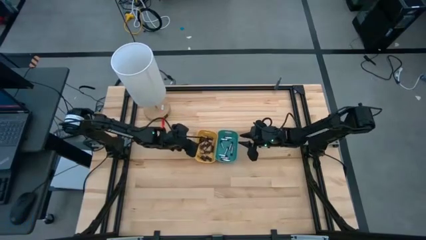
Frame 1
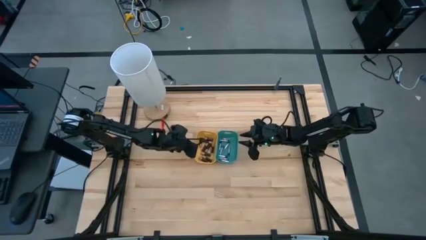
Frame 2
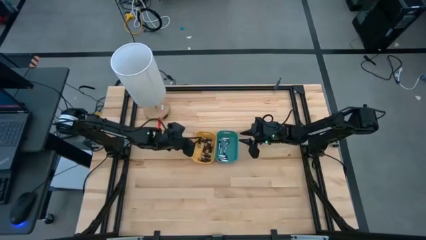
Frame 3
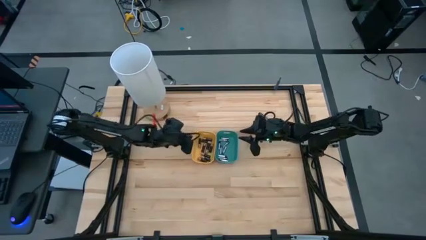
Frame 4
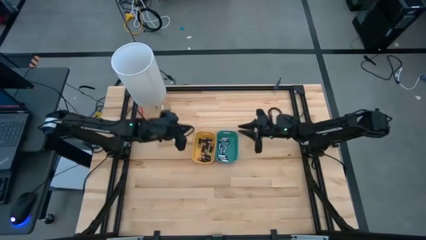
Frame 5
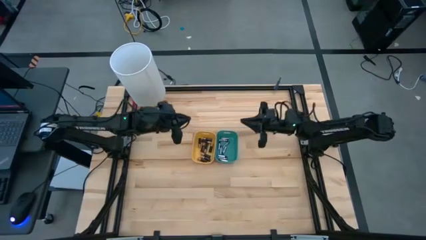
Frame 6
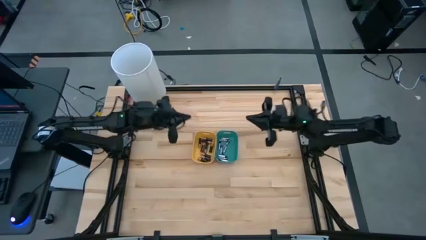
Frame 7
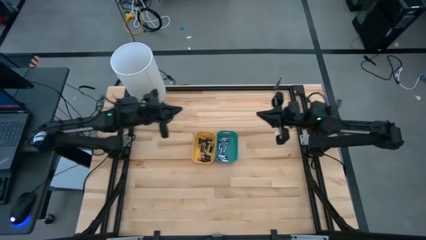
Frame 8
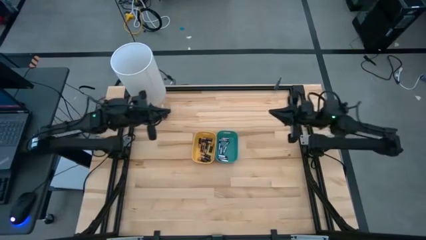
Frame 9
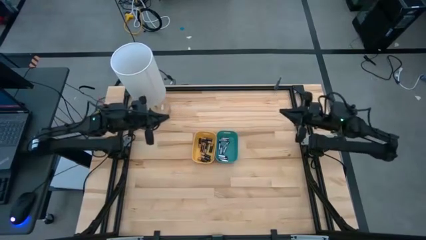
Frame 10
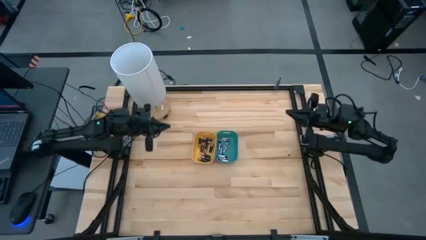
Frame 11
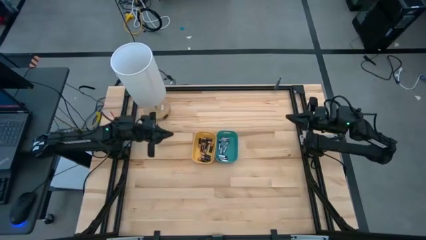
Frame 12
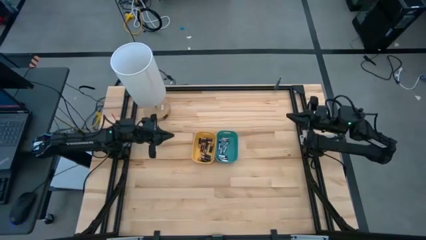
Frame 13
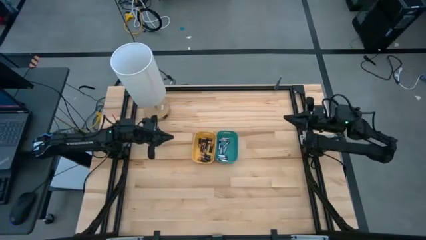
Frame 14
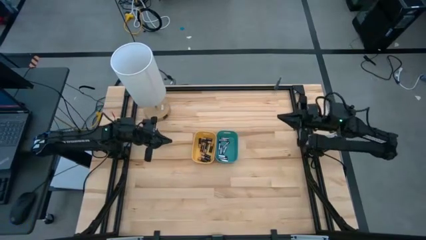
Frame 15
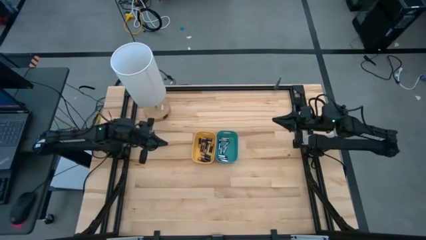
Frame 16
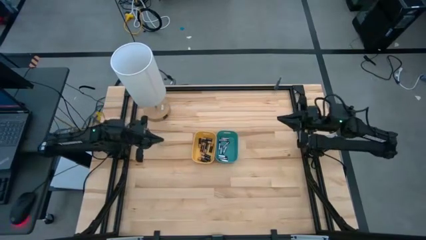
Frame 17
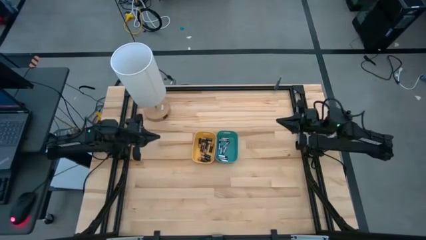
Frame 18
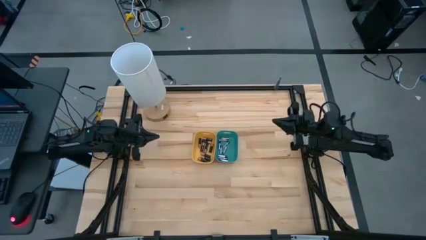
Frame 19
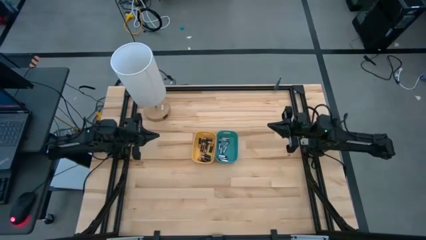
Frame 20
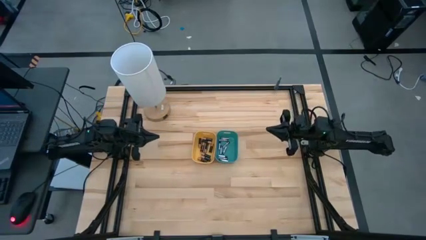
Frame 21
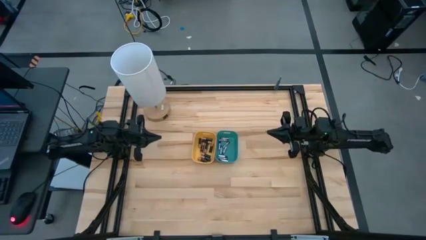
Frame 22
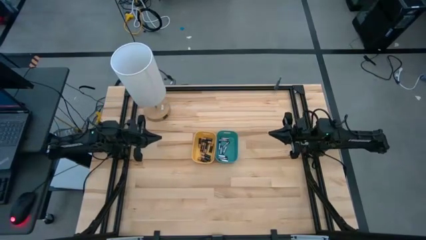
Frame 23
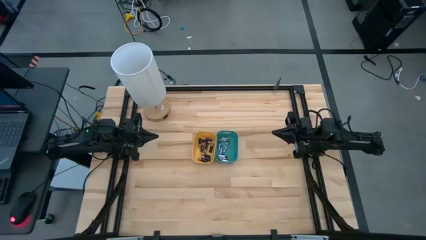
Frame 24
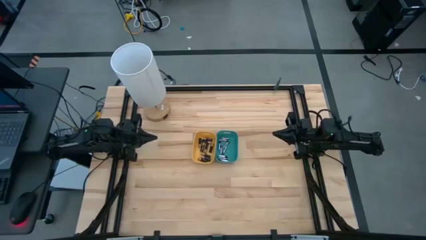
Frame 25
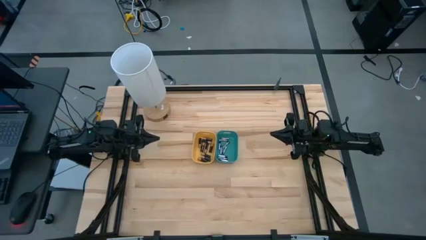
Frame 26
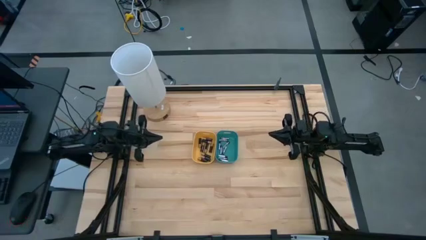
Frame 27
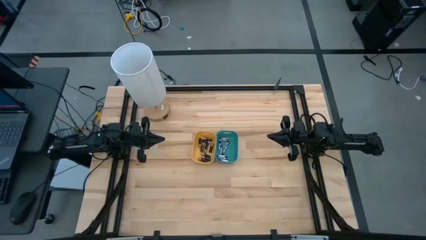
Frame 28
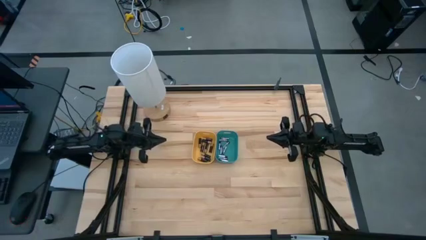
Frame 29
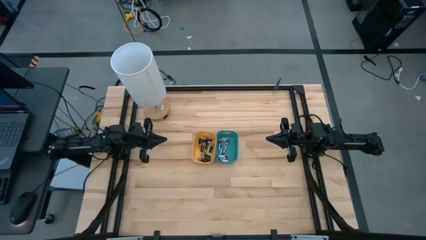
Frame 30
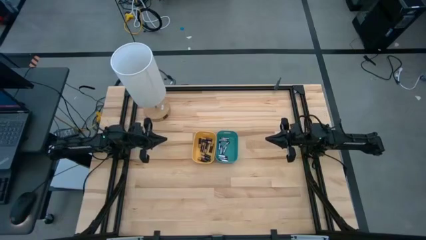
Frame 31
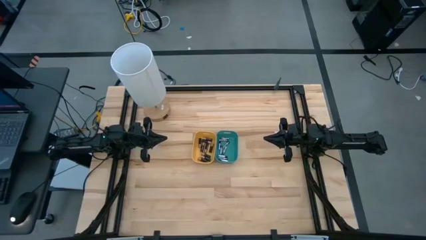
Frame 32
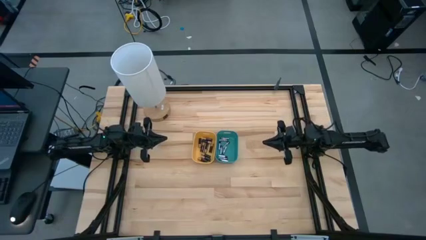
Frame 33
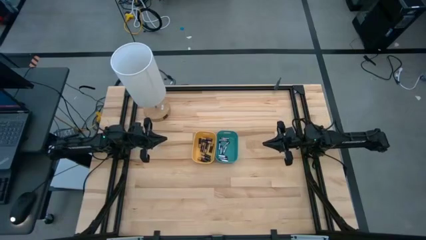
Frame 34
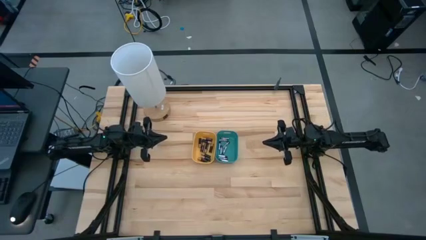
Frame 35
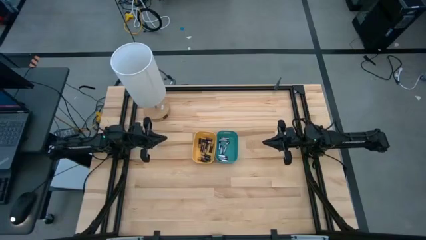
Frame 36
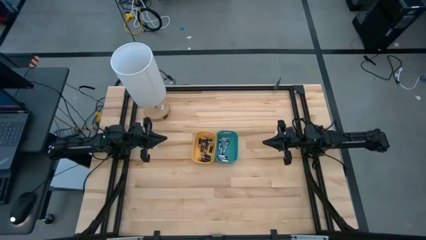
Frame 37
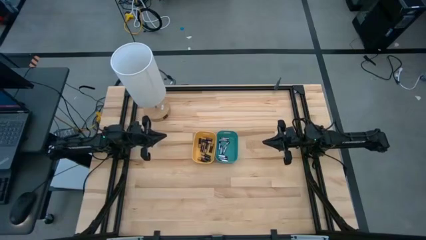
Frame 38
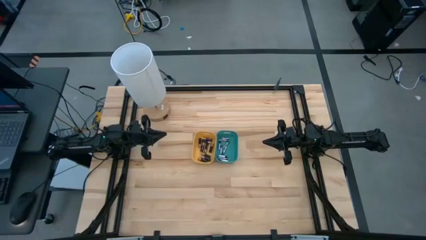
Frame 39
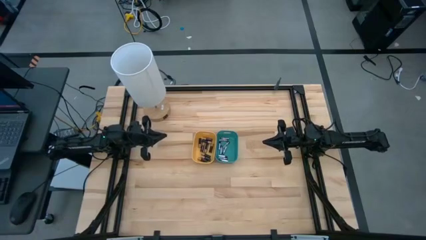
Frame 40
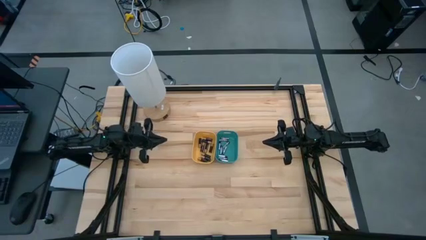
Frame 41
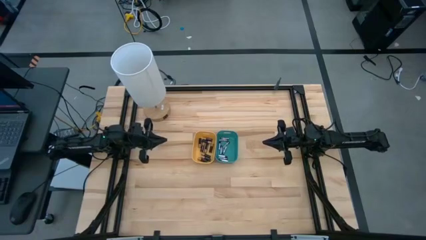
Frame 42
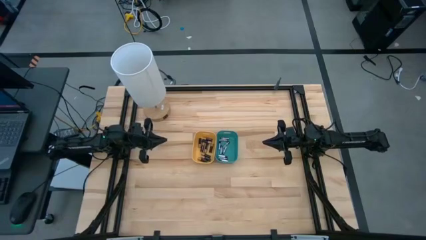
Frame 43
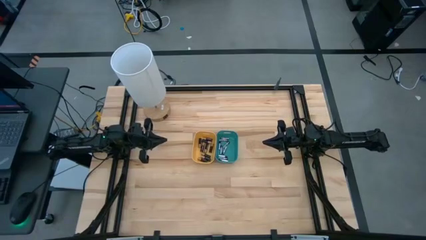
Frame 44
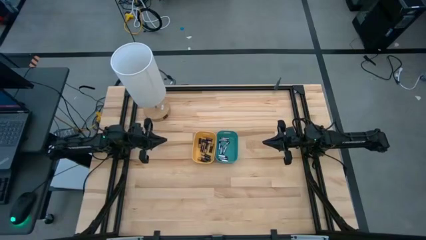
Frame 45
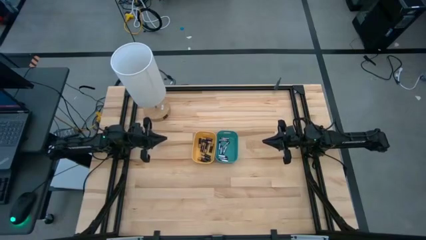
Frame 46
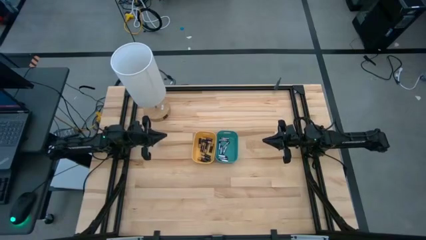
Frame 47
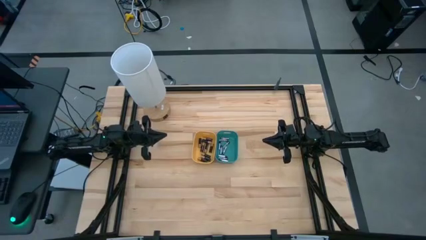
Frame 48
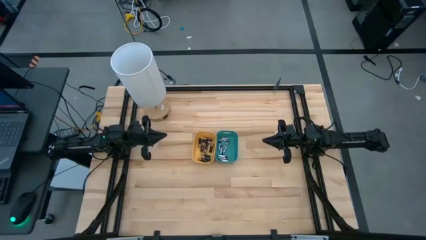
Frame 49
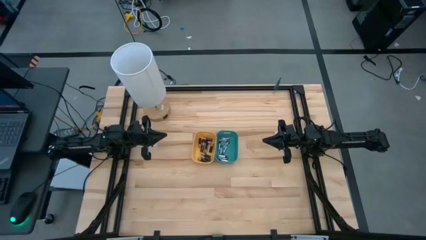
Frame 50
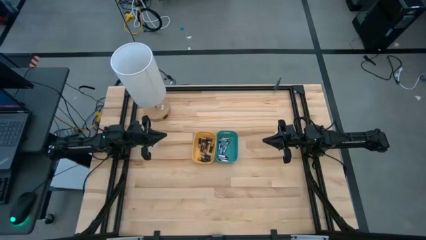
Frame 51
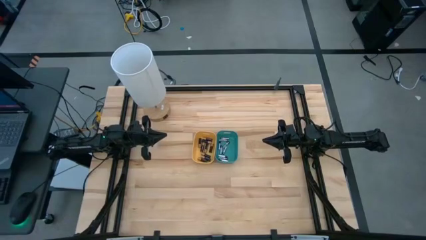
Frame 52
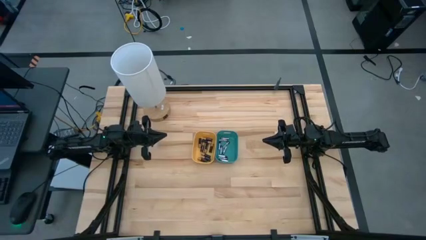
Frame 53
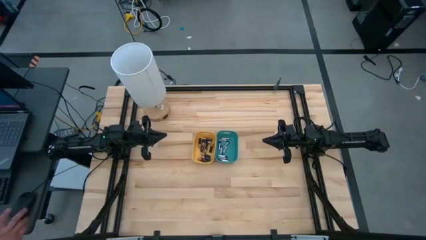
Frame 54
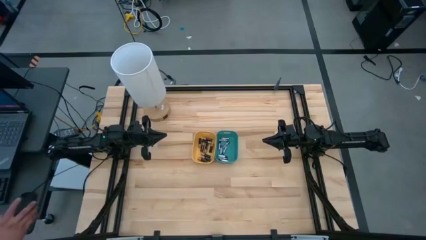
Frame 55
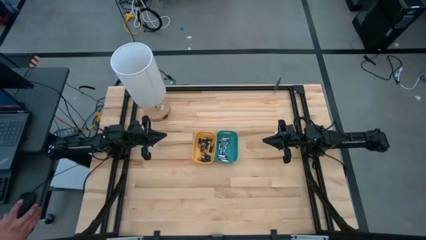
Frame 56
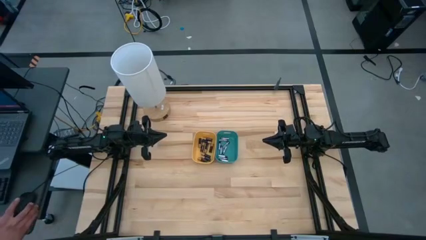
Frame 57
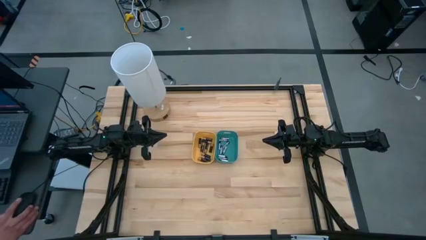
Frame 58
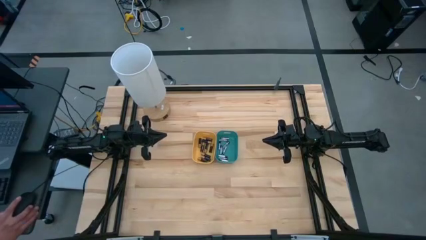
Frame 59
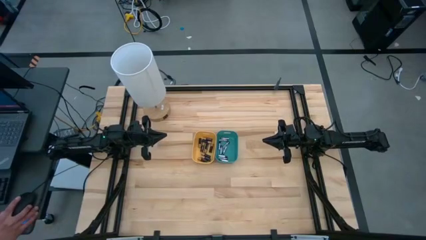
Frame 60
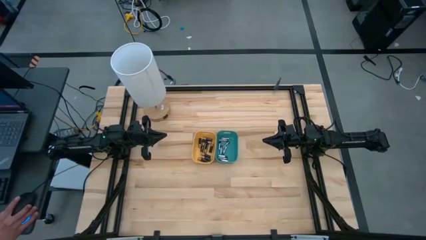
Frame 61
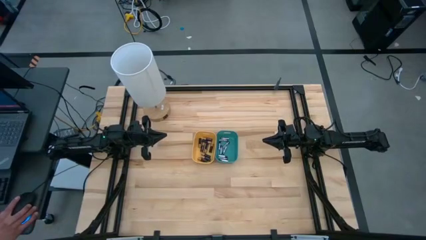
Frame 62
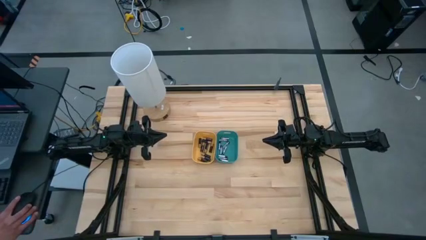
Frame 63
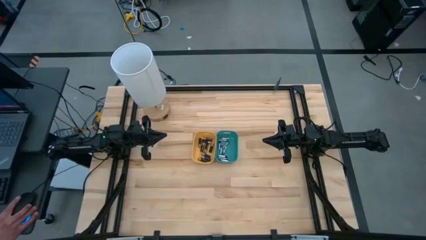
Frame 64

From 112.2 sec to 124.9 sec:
Task: Sort batteries
Return to Home Position

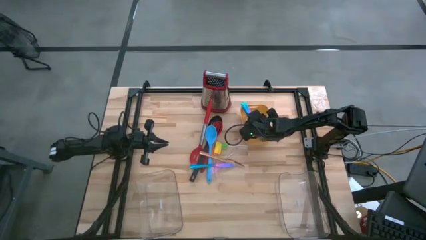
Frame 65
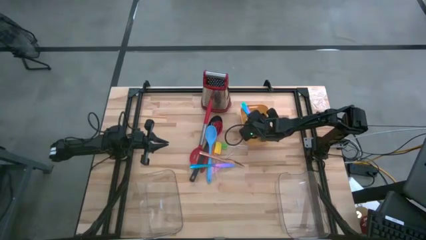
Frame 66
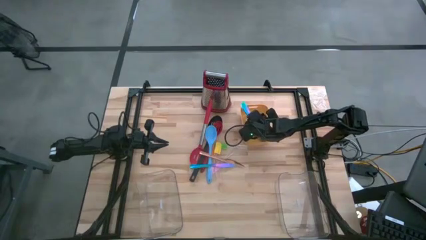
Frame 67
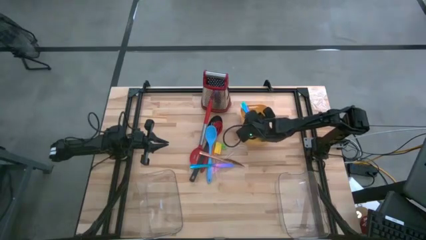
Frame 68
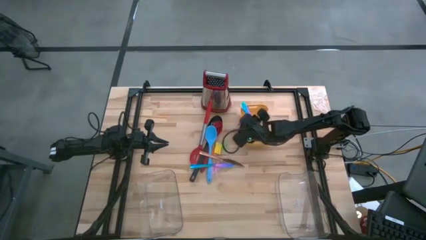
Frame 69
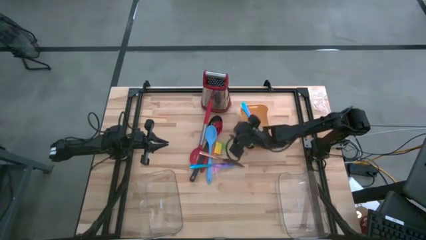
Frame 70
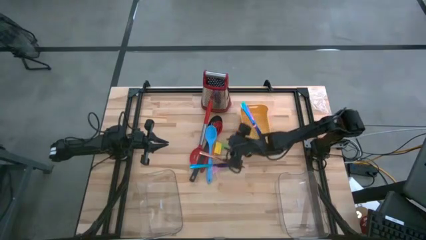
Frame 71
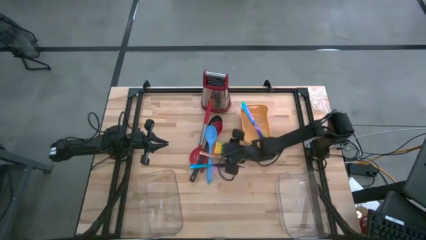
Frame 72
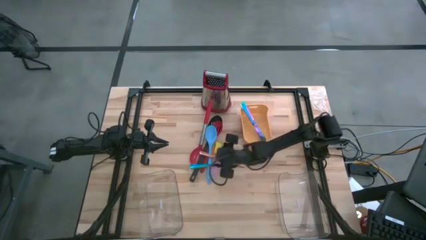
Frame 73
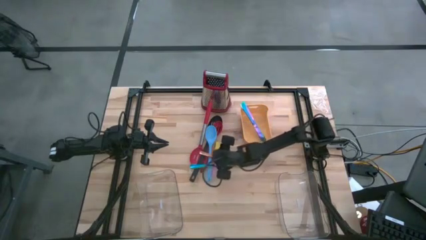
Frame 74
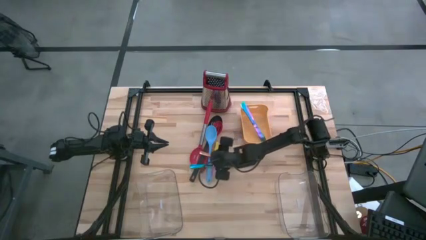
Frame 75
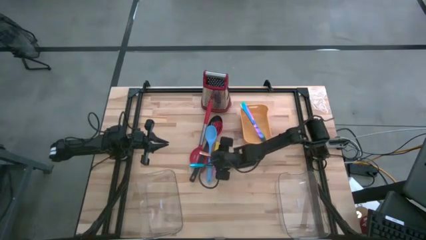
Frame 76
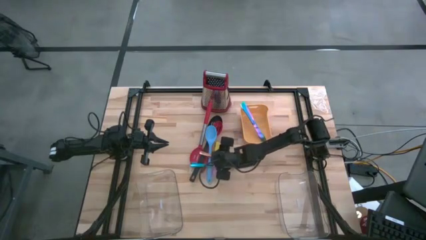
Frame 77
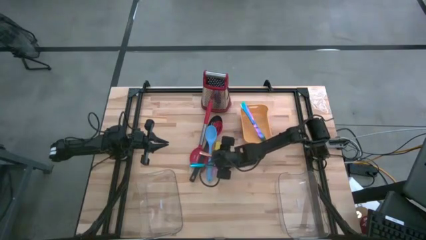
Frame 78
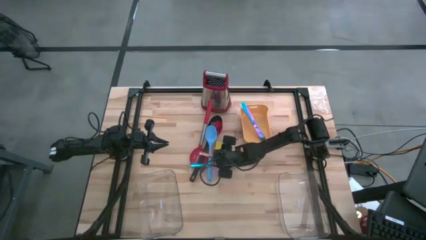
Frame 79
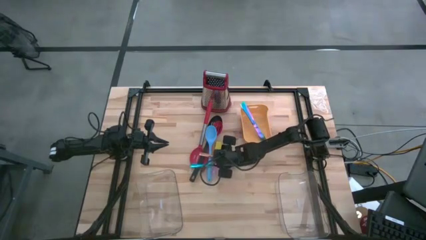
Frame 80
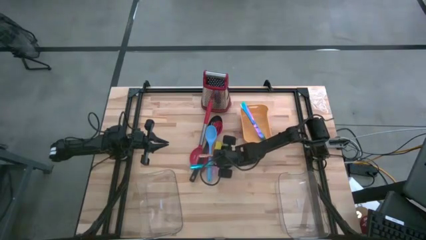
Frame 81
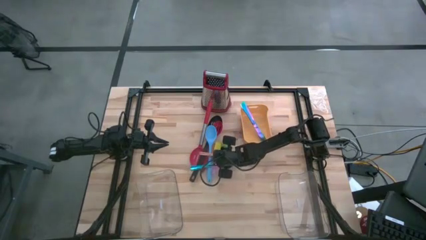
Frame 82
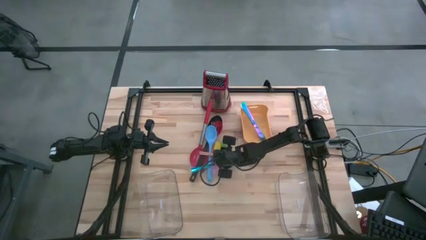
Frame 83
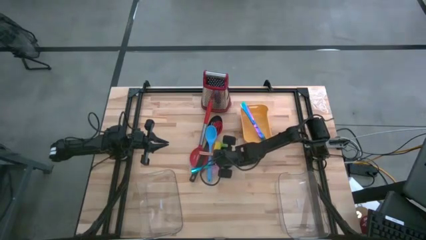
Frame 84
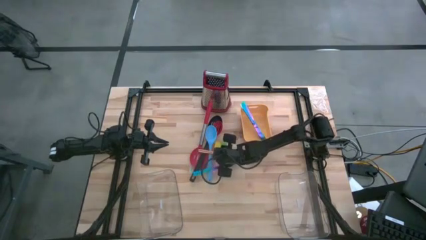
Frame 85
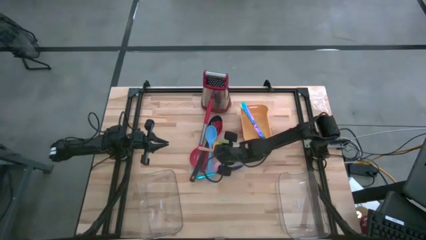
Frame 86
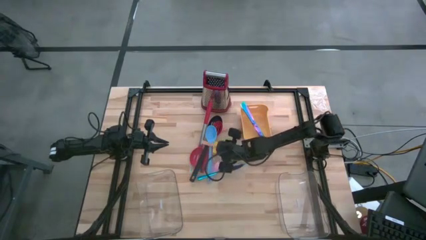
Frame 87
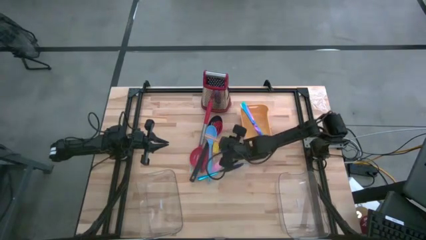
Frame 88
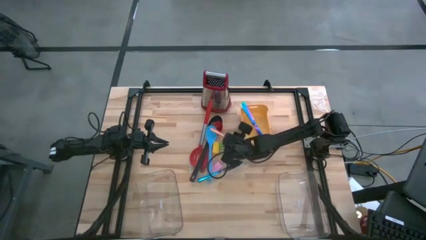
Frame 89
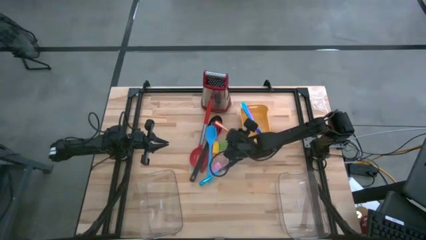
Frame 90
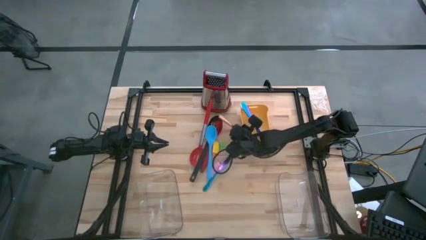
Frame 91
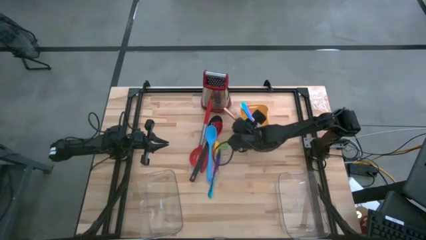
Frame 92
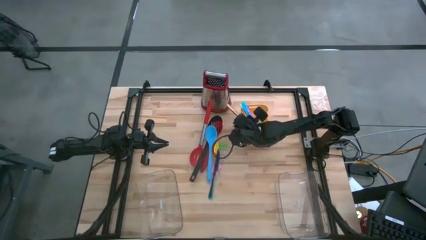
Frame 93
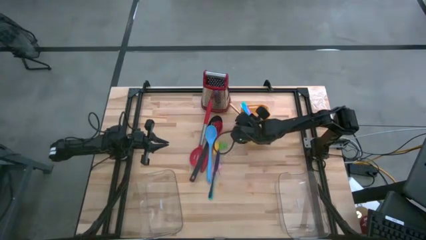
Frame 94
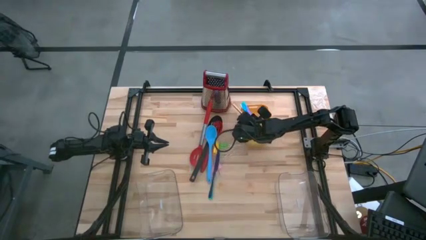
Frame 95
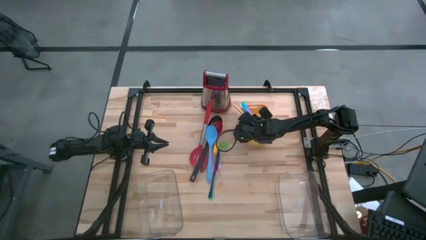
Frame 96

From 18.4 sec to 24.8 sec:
Task: Pick & Place Kitchen Items
Put the gold table knife into the yellow bin
